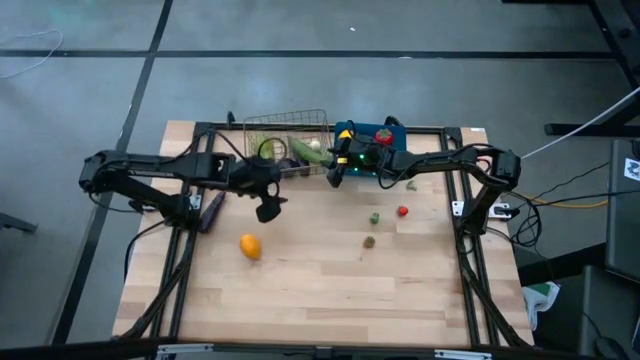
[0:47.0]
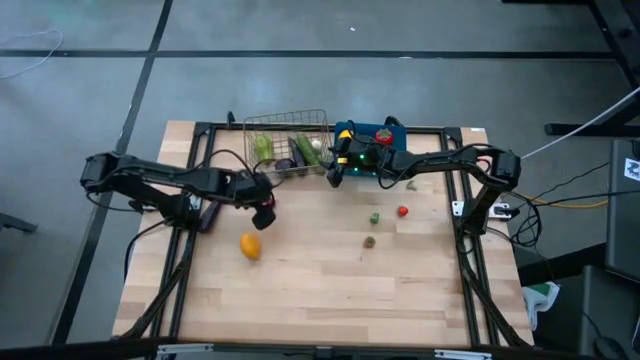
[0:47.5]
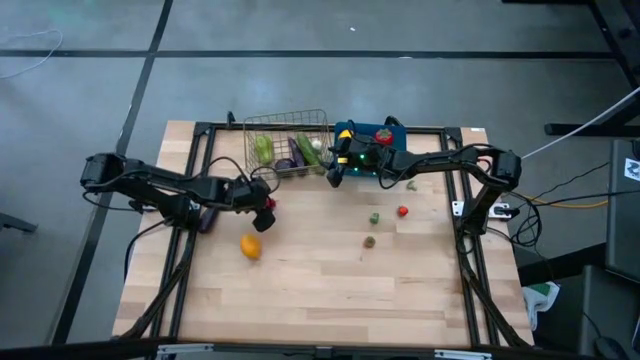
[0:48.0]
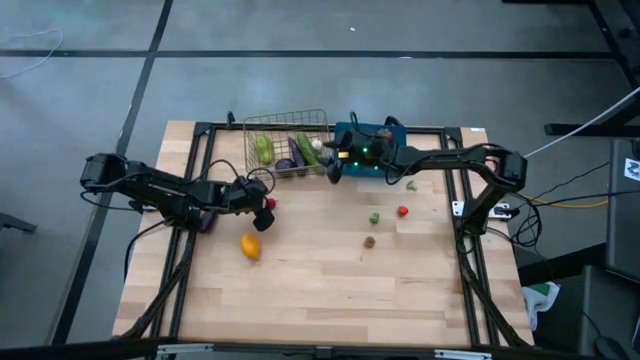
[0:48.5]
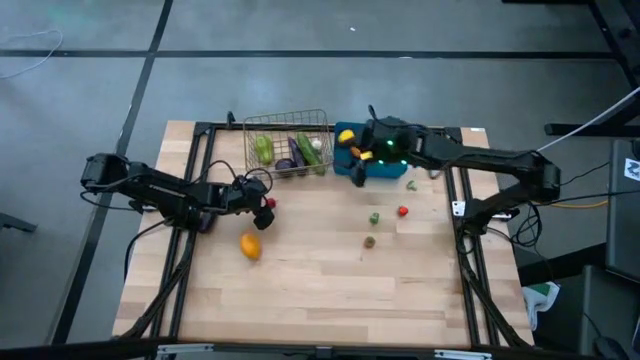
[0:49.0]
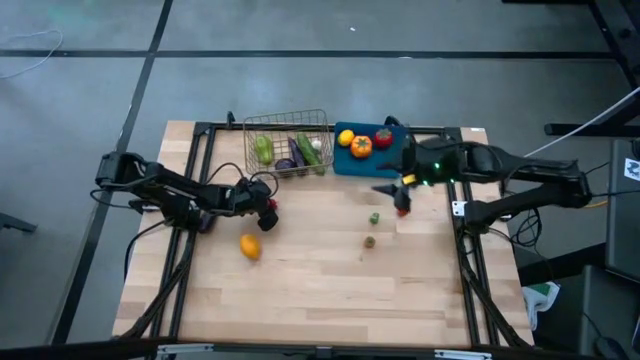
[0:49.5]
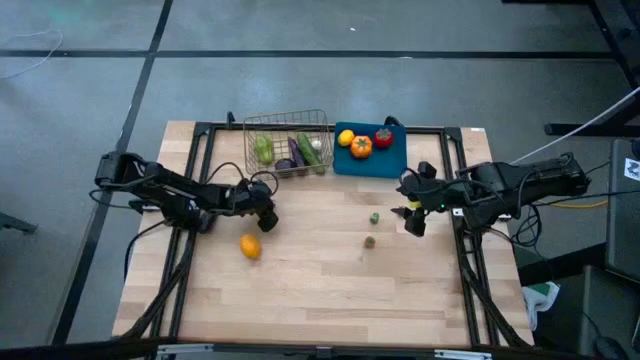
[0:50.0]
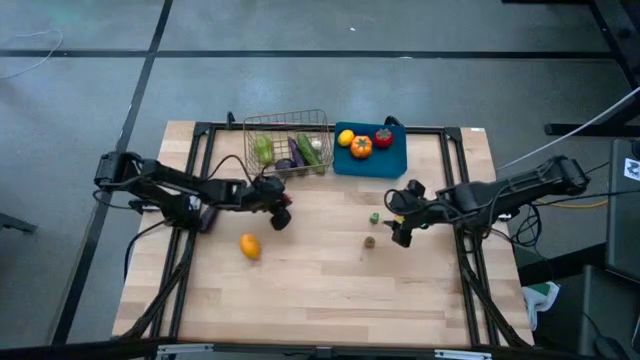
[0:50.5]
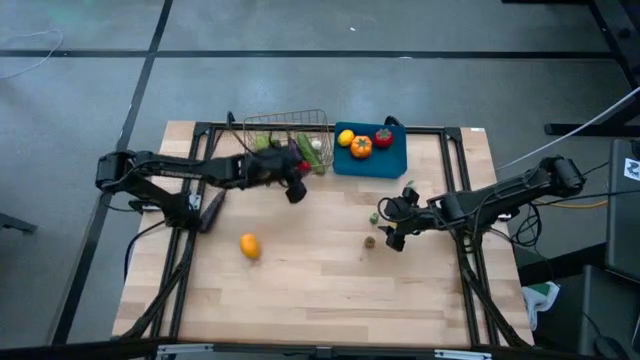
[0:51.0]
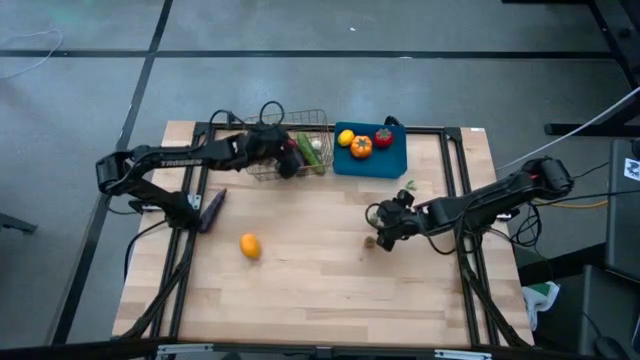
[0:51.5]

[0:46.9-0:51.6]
Task: Sort produce into baskets
Put the red bell pepper into the wire basket

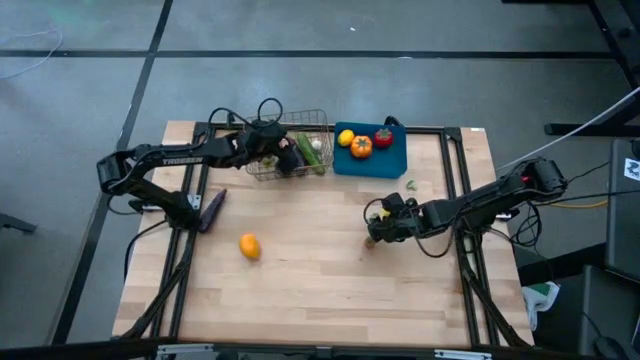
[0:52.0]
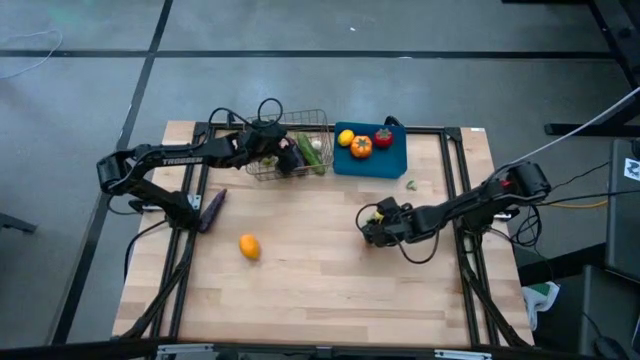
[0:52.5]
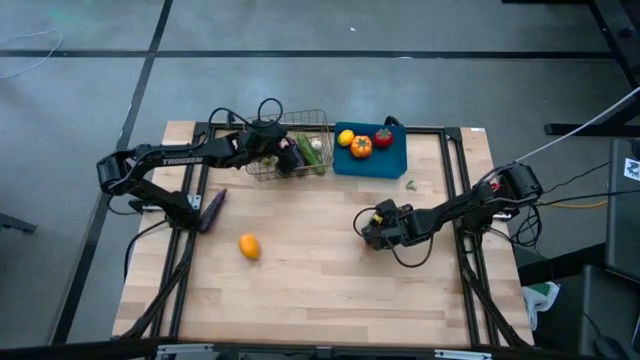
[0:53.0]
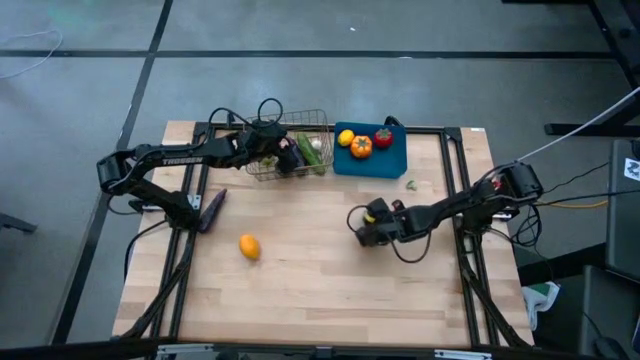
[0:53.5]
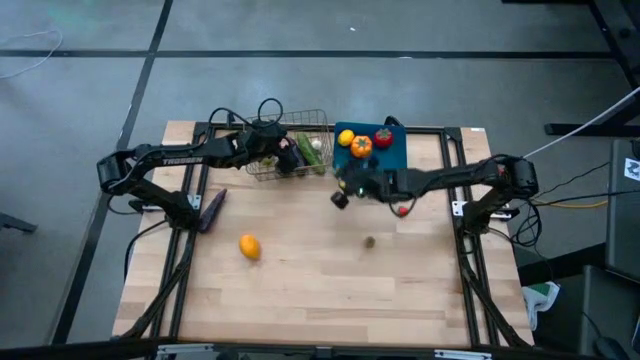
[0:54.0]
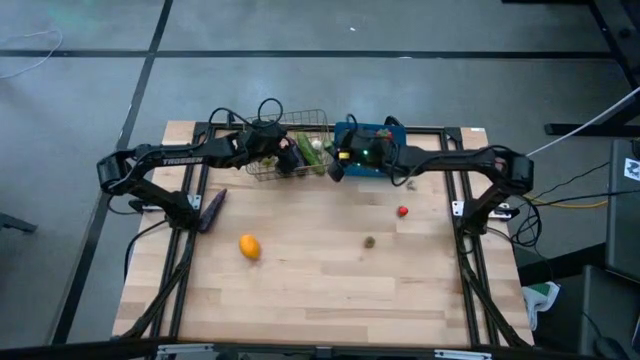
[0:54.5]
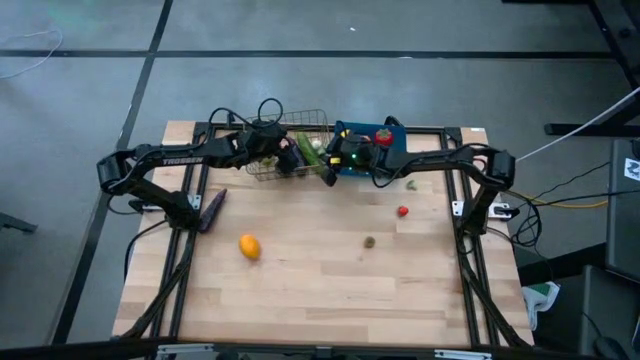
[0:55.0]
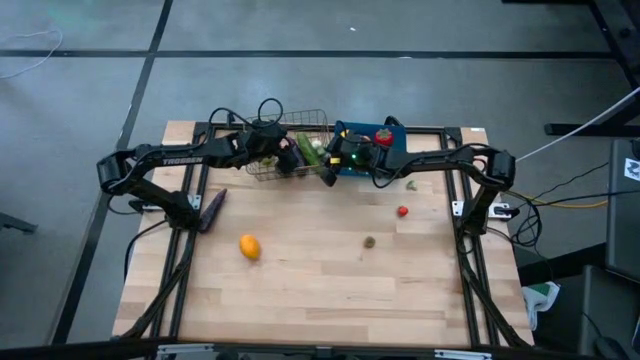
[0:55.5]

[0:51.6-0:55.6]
Put the green bell pepper into the wire basket

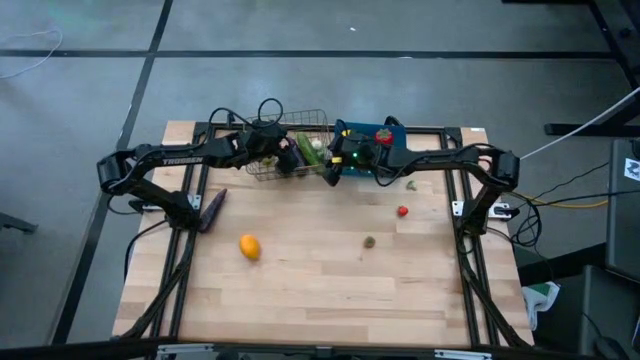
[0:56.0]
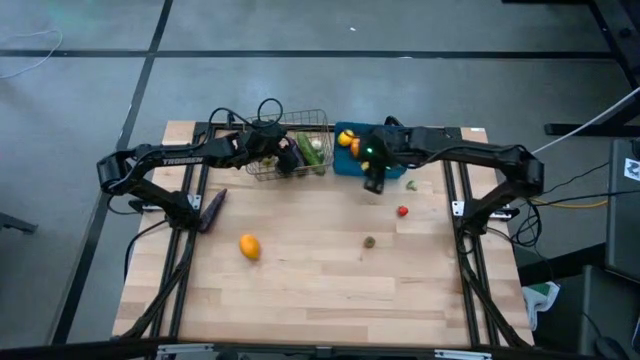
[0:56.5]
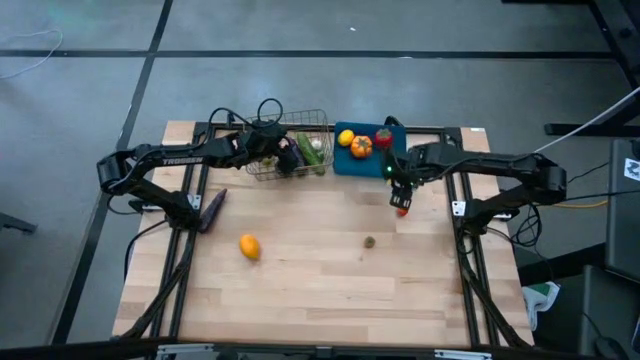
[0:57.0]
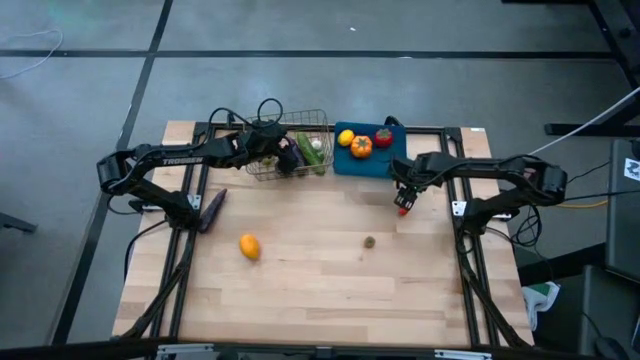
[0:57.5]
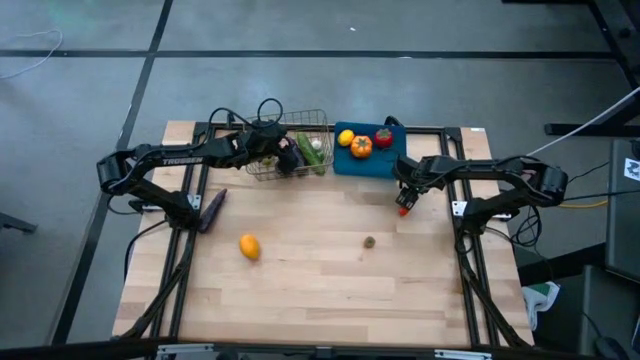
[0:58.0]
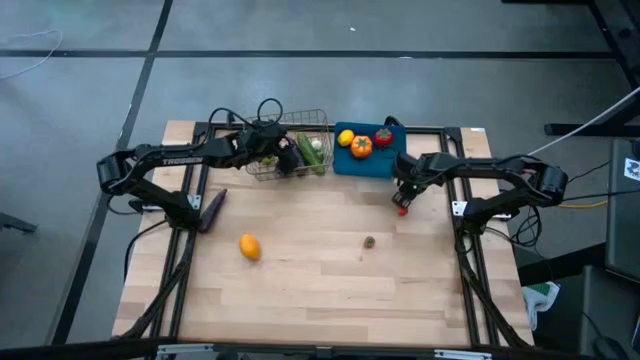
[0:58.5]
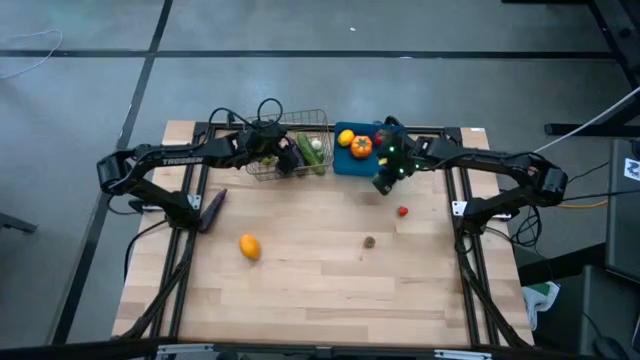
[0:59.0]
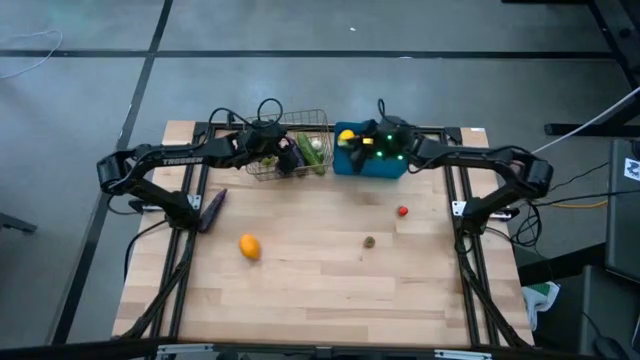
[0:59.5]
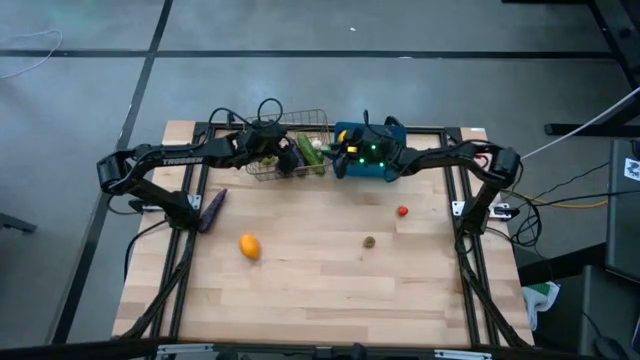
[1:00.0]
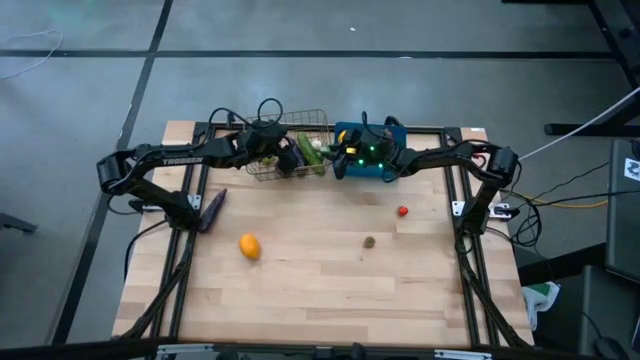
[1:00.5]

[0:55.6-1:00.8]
Put the mushroom into the wire basket

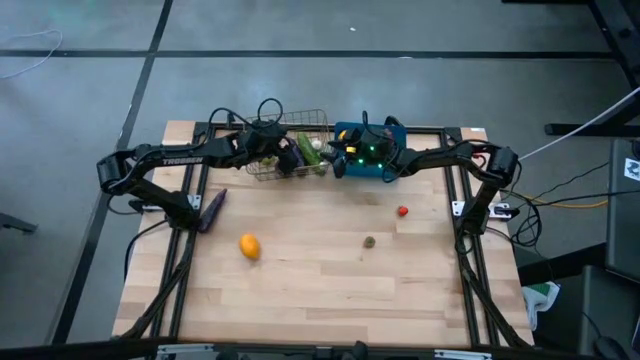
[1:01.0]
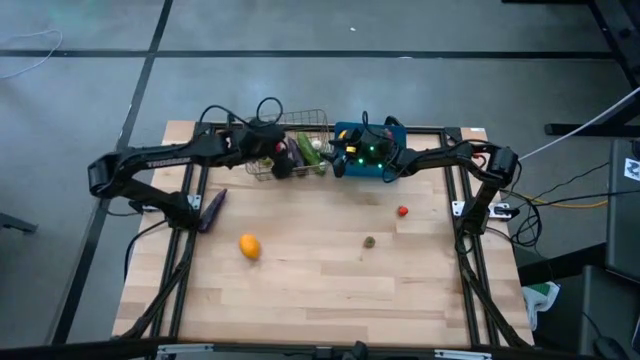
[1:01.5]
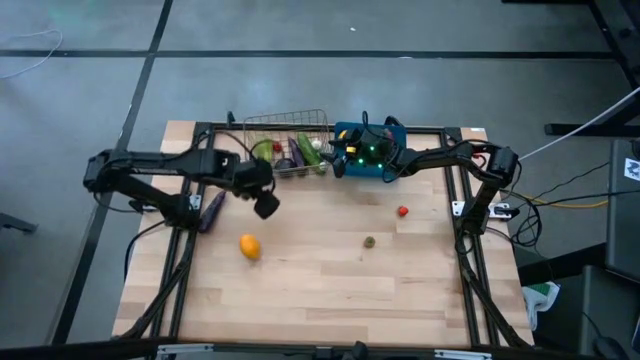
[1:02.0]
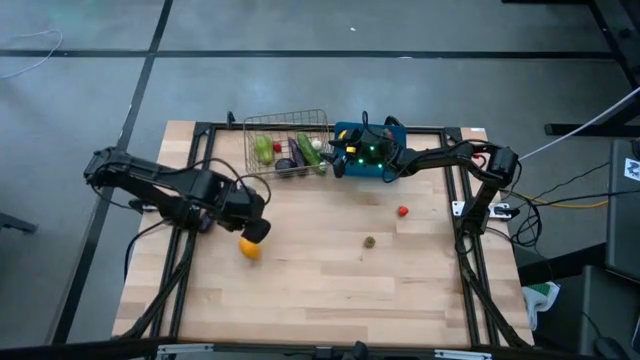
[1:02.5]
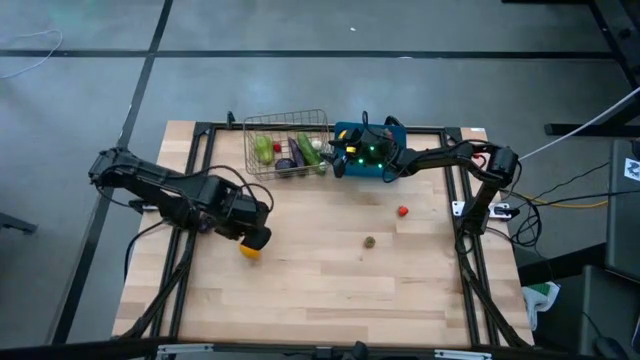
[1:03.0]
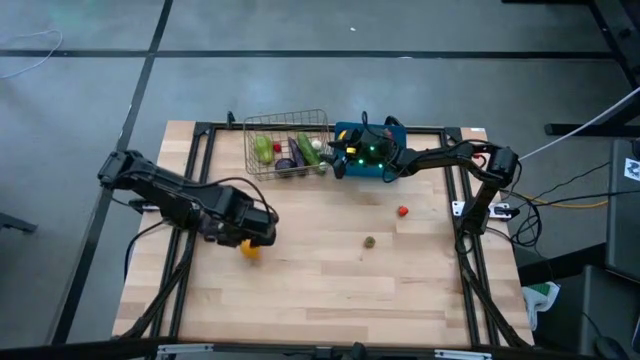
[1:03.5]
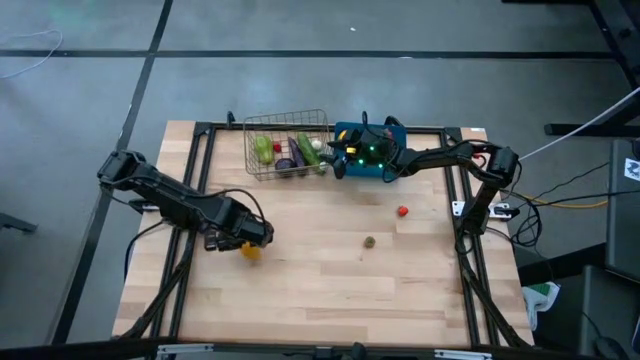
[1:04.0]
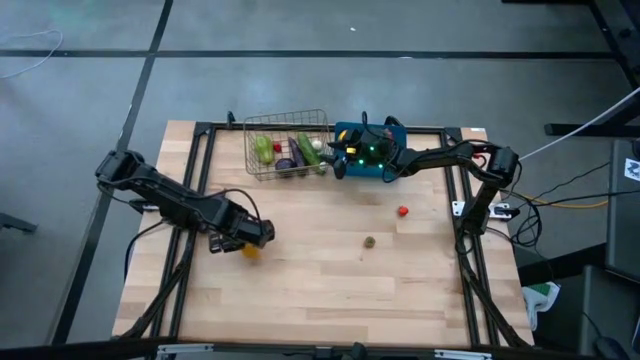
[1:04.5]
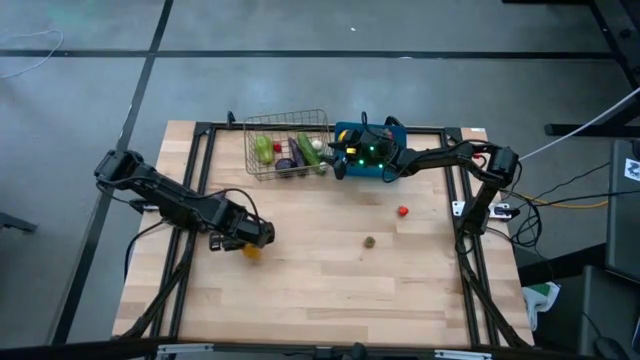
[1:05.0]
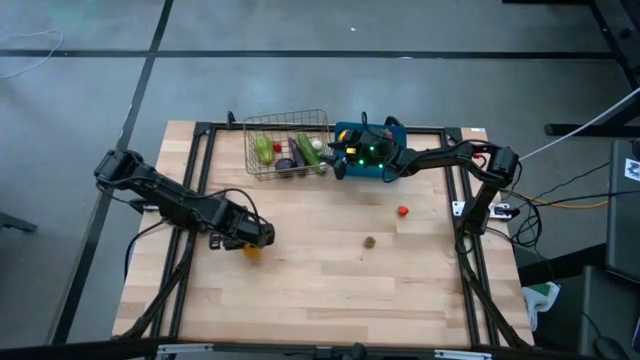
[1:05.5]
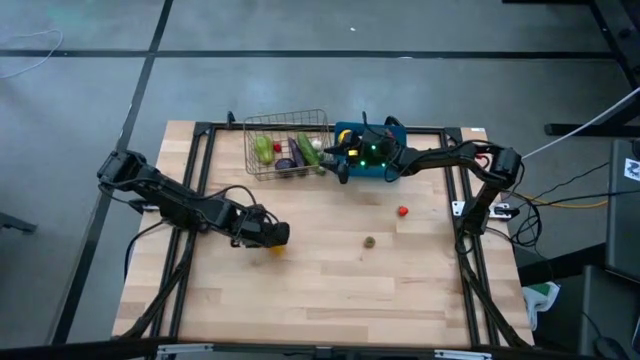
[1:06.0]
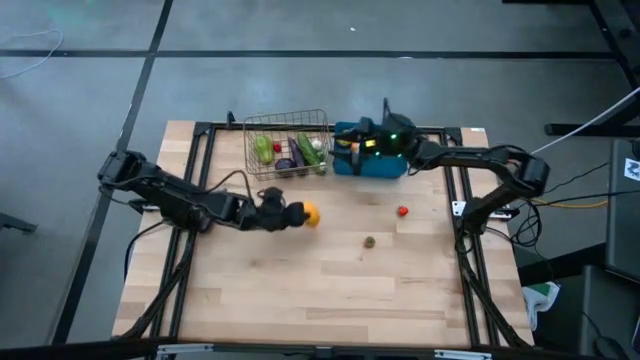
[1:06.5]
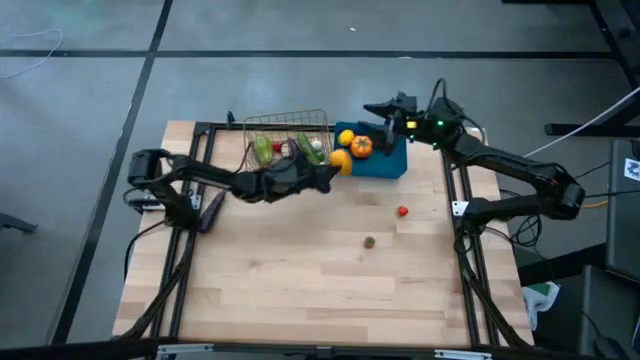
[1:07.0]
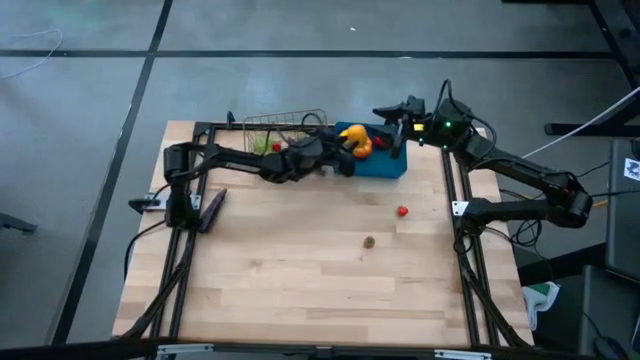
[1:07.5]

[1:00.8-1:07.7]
Put the lemon into the blue bin
